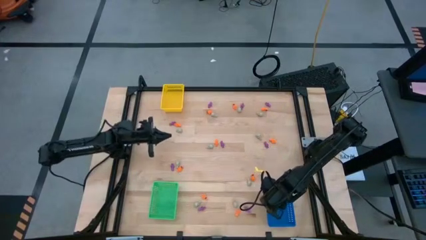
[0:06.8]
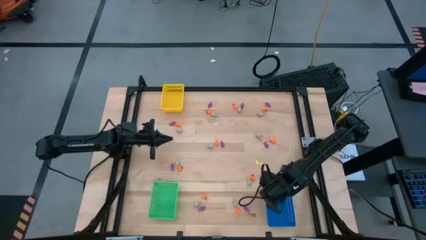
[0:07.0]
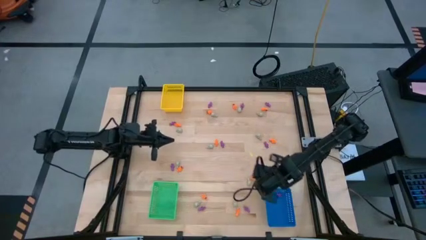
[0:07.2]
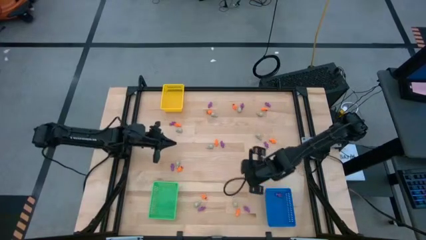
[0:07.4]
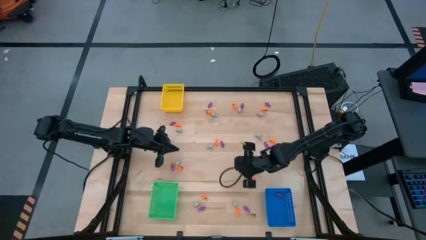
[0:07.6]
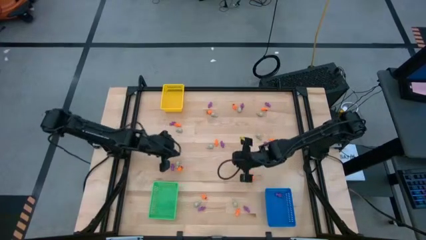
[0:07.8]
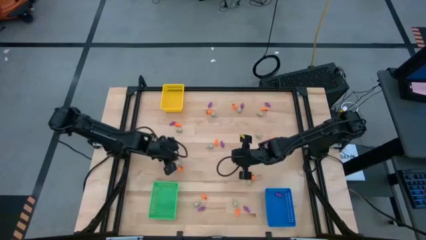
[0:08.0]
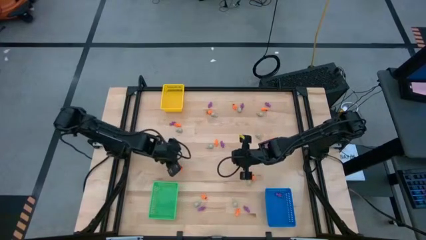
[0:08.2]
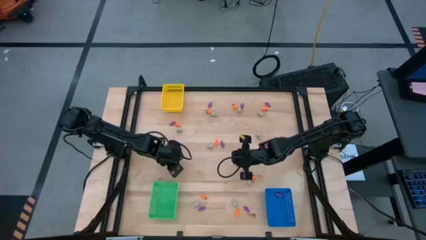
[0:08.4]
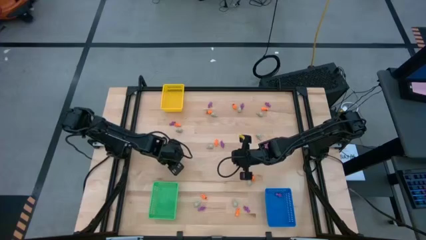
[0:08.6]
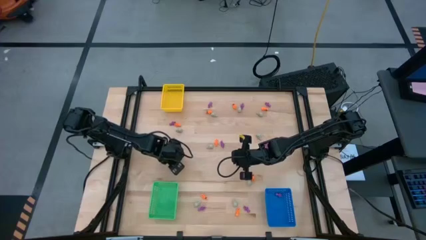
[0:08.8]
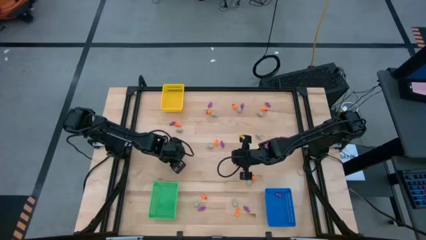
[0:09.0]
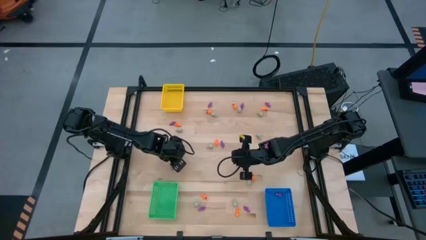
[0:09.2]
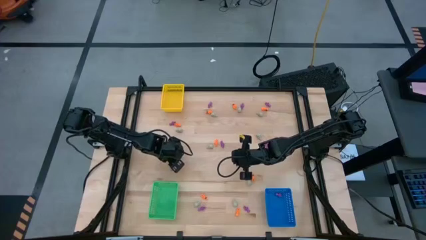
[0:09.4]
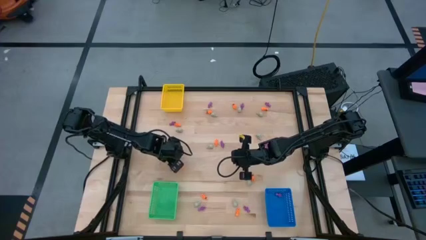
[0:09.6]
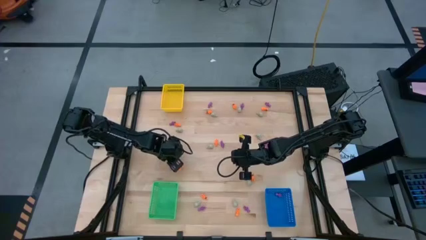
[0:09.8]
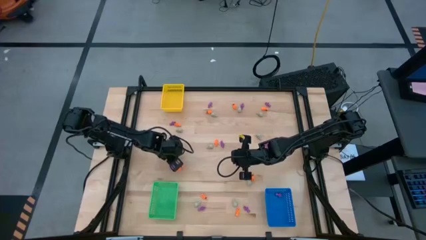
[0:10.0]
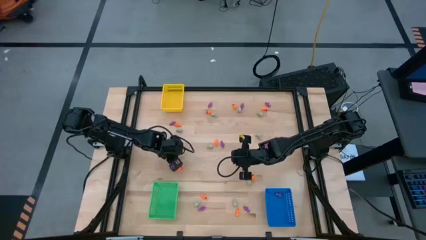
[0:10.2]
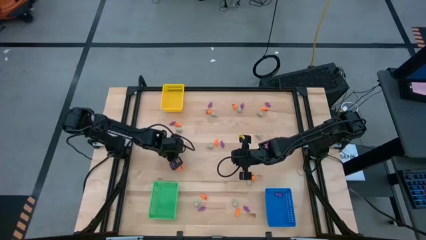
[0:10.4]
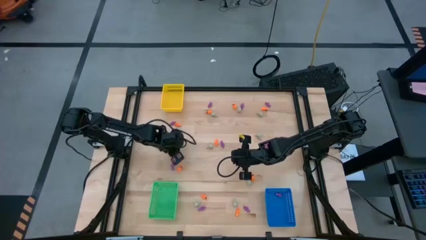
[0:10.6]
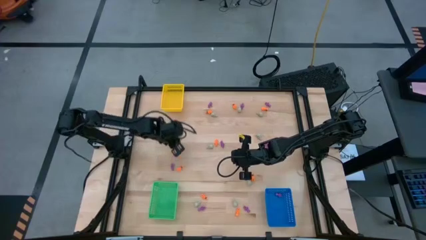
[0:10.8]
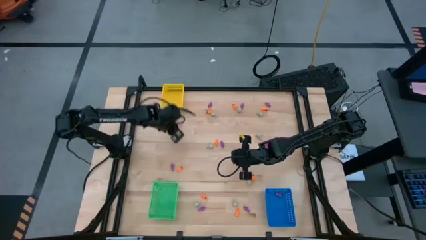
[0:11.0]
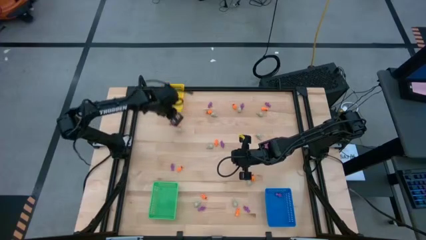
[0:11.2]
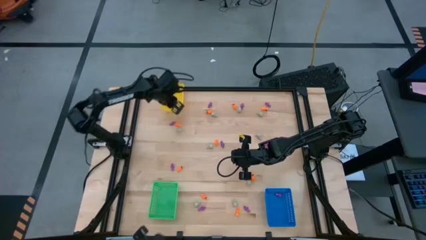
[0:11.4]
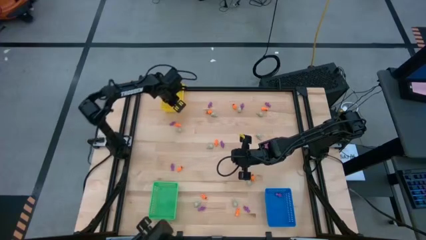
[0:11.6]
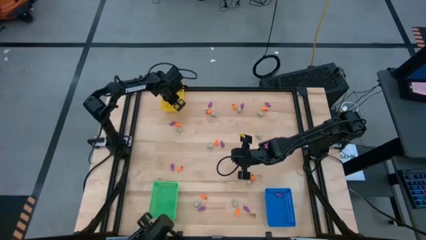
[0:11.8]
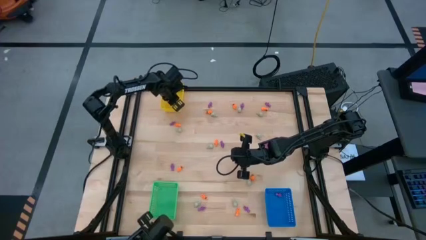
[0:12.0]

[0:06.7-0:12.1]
Task: Sort Halloween decoration
Put the gray skull toy into the yellow bin

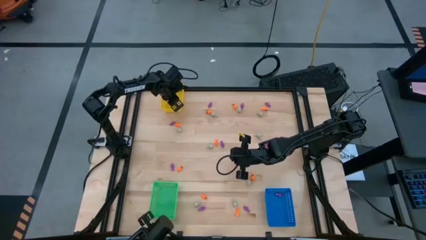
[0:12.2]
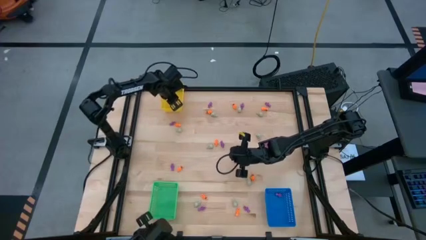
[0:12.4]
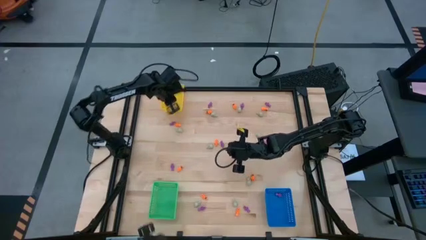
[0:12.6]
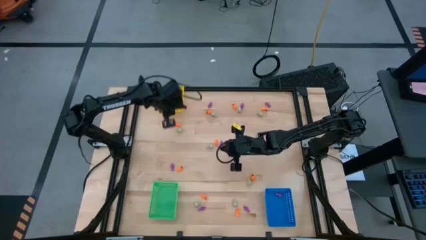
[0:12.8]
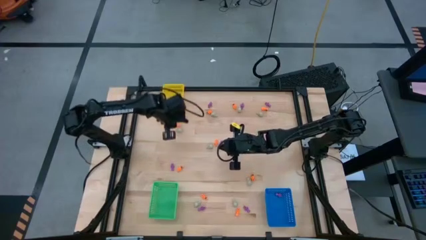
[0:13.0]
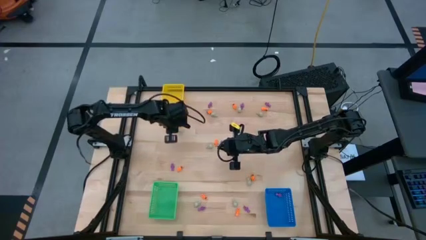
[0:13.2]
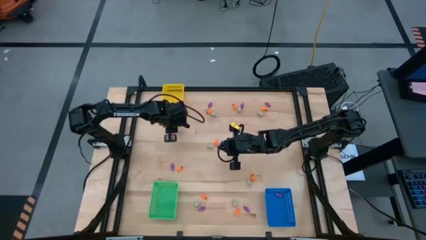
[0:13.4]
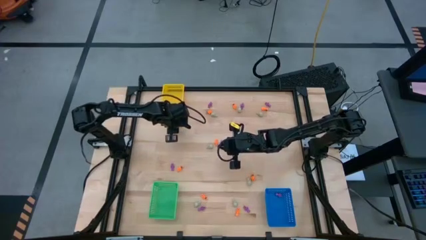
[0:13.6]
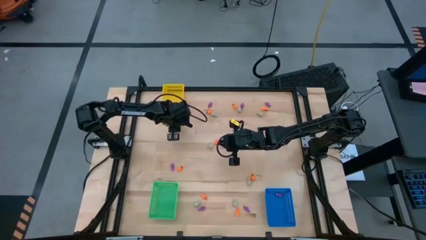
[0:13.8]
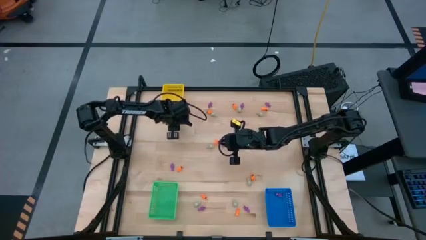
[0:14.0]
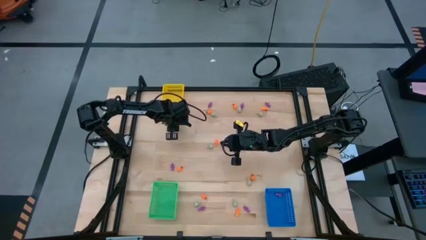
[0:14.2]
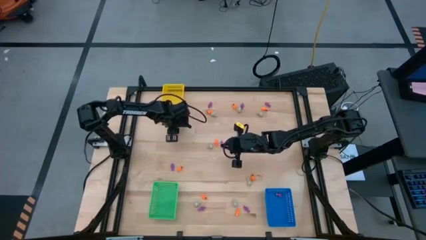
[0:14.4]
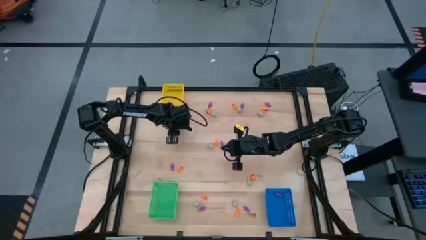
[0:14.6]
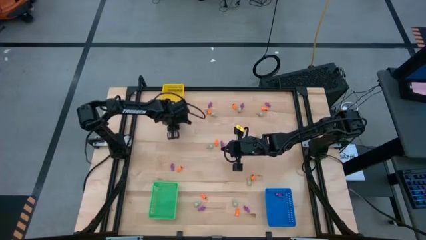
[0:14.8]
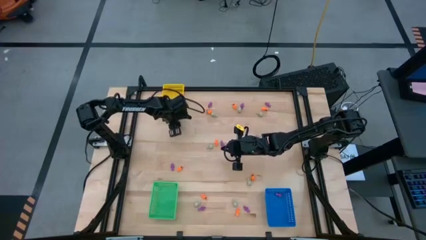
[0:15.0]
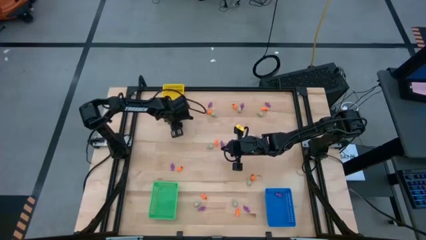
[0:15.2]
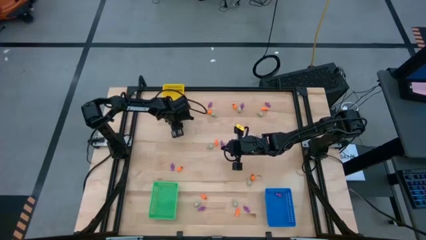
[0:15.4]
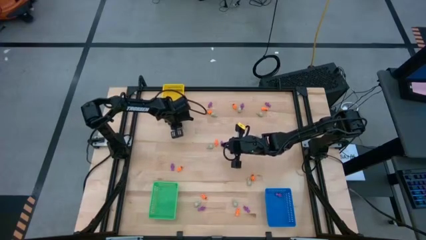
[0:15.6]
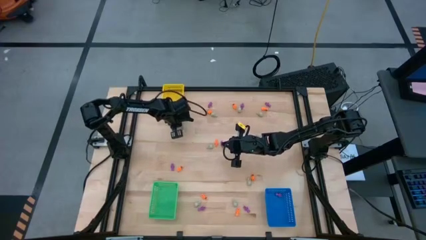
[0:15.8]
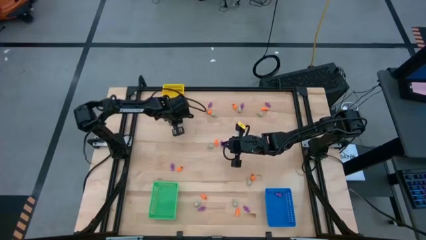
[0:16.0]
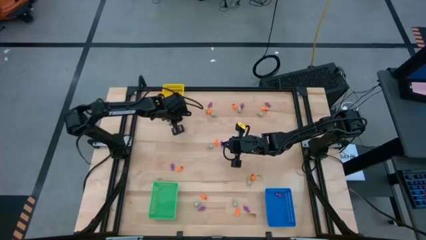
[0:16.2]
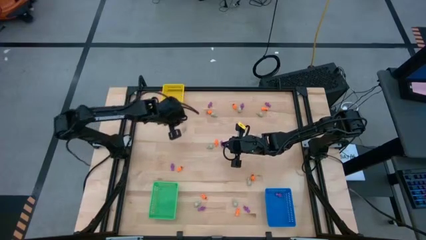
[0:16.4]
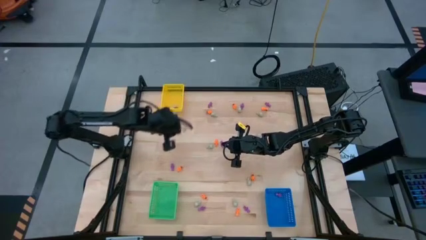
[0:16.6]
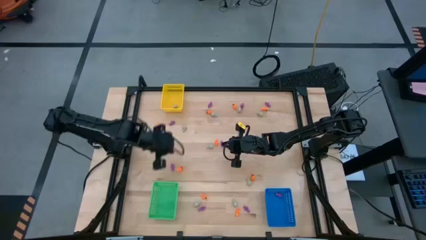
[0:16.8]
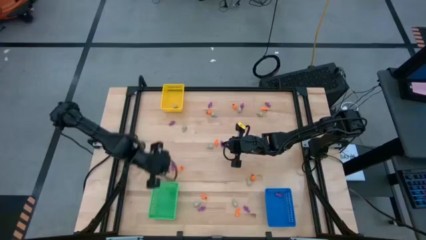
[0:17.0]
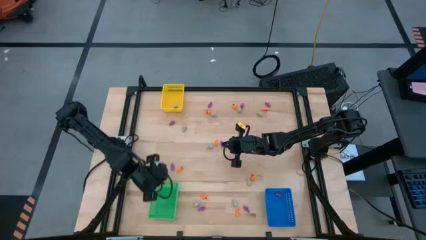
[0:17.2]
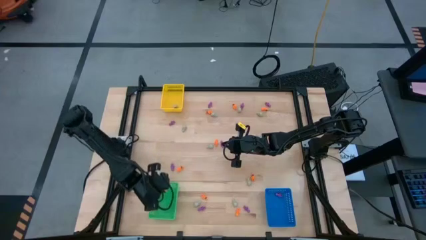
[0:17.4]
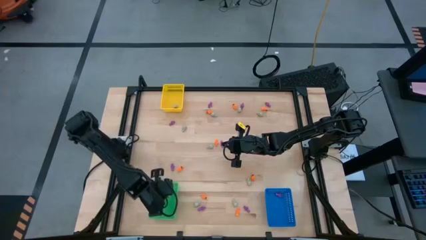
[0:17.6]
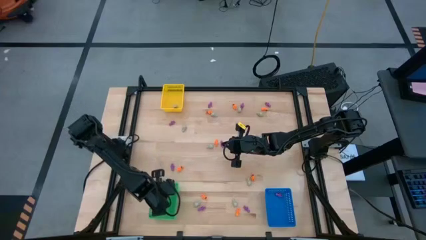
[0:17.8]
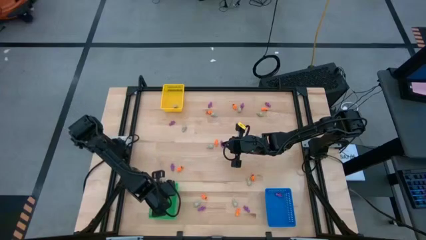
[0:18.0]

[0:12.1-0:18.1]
Put the orange skeleton toy into the green bin

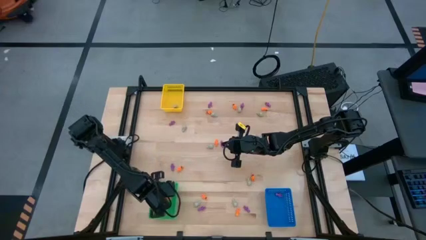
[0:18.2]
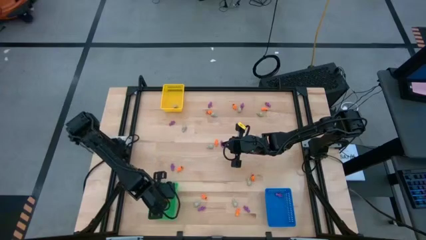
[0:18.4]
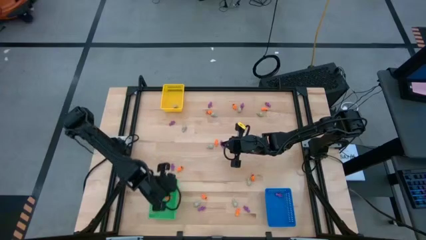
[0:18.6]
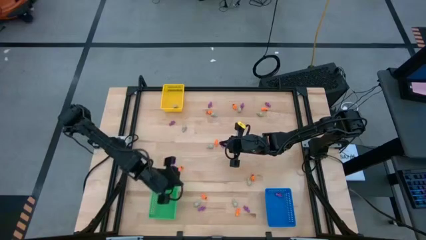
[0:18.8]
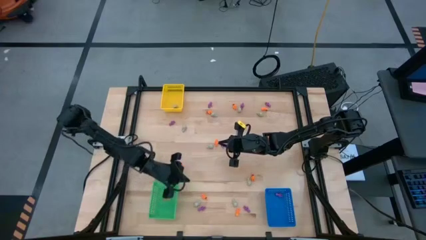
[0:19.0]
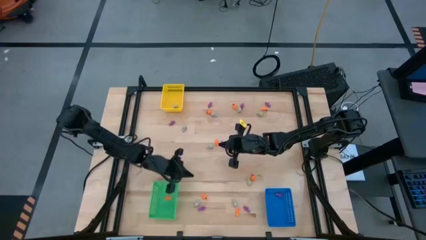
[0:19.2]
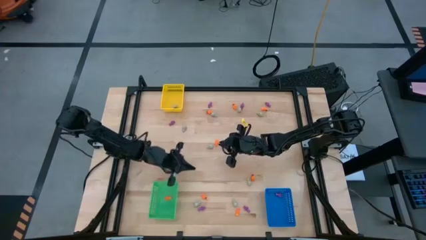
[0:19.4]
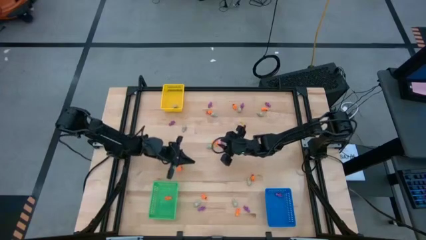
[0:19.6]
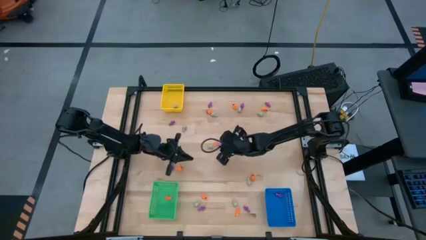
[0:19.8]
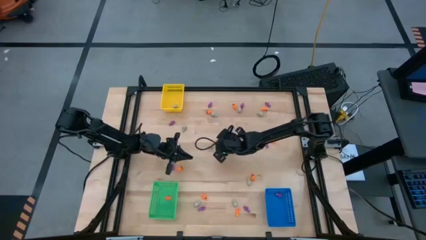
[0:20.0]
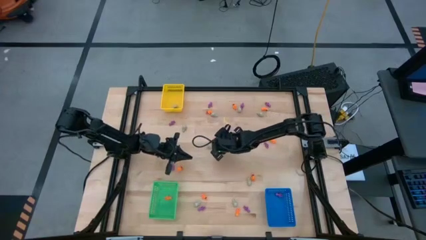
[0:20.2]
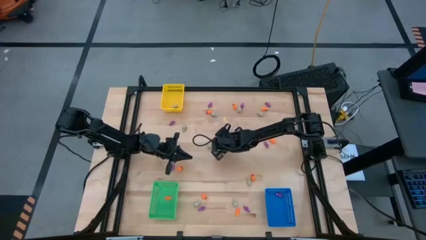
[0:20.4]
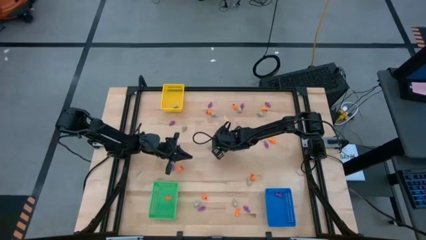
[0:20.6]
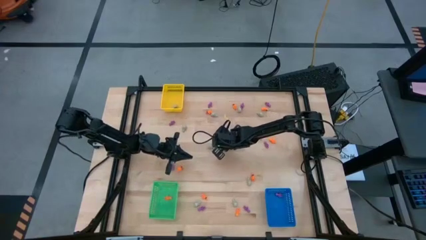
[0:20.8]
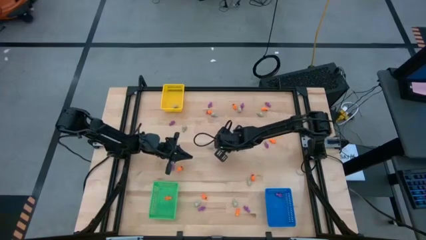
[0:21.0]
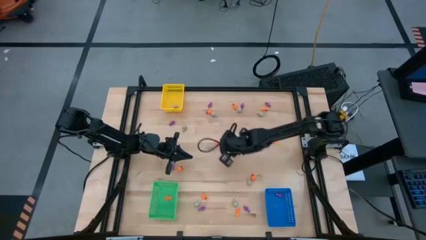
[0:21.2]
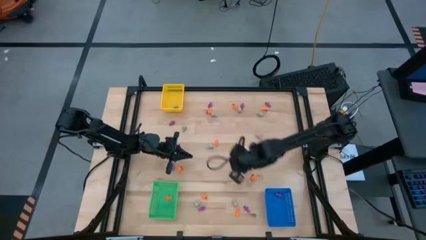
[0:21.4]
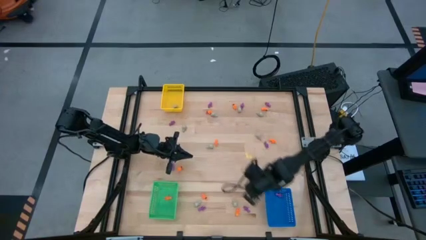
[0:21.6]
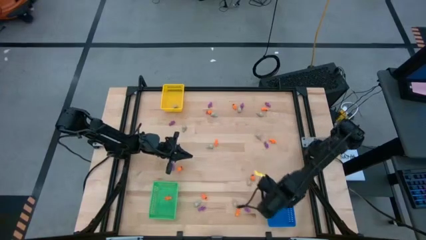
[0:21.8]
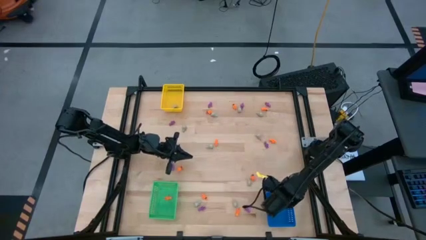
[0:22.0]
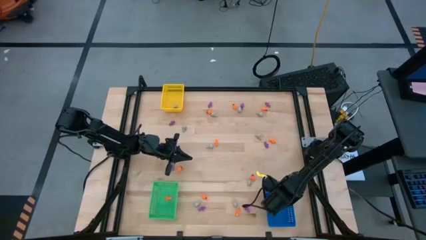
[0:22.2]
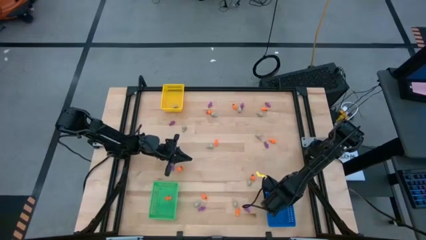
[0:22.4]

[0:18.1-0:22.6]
Put the purple skeleton toy into the blue bin
